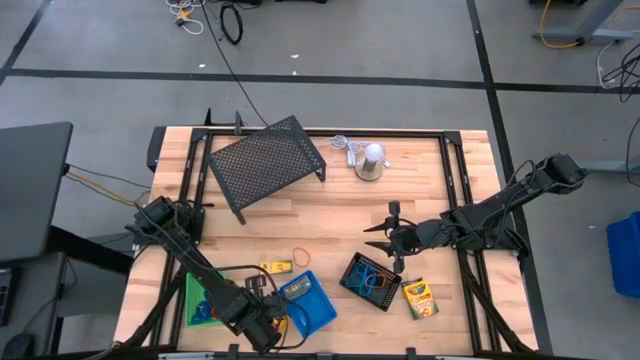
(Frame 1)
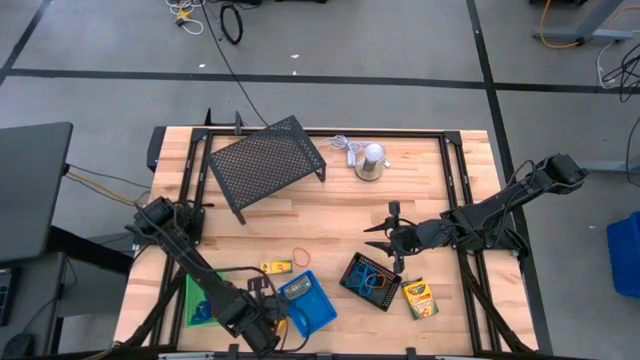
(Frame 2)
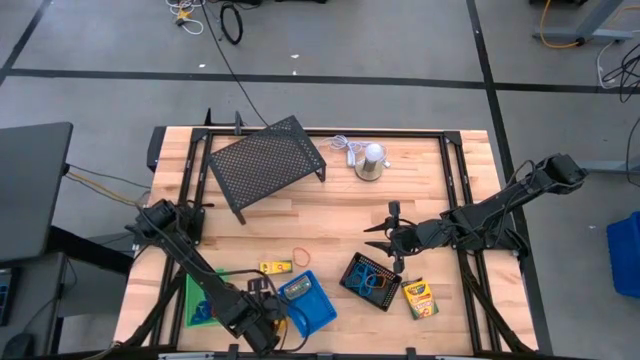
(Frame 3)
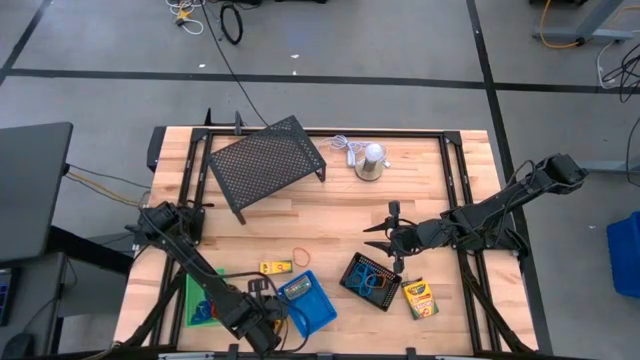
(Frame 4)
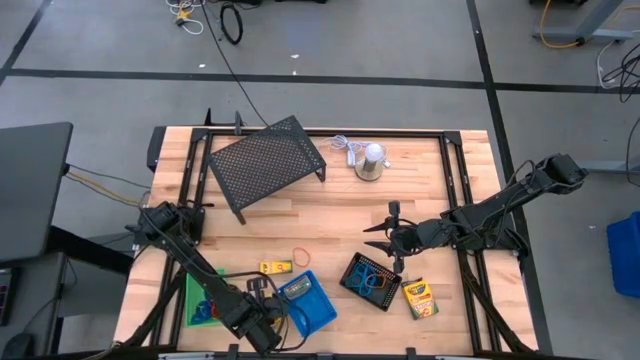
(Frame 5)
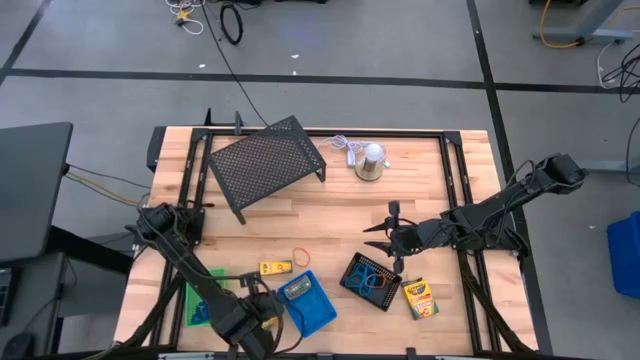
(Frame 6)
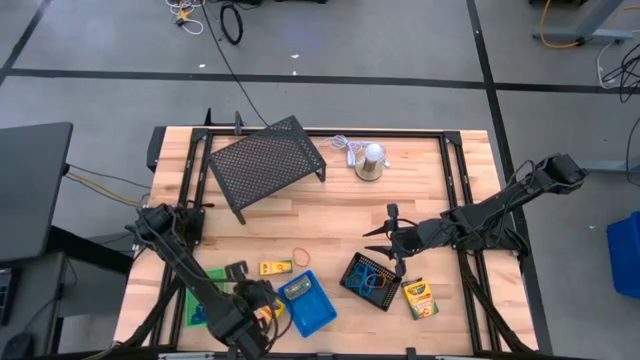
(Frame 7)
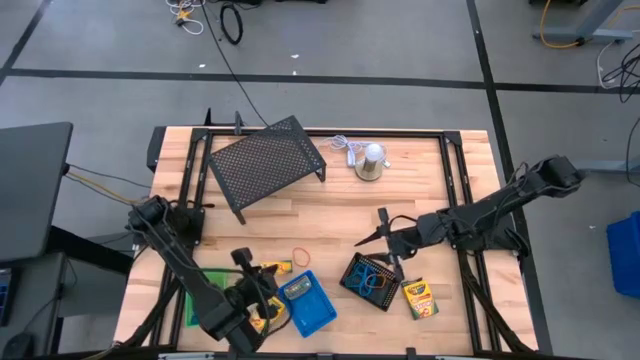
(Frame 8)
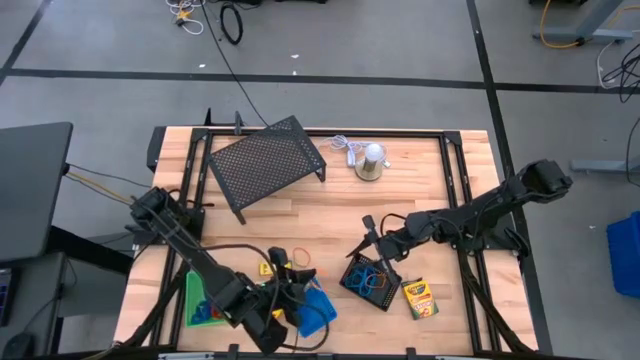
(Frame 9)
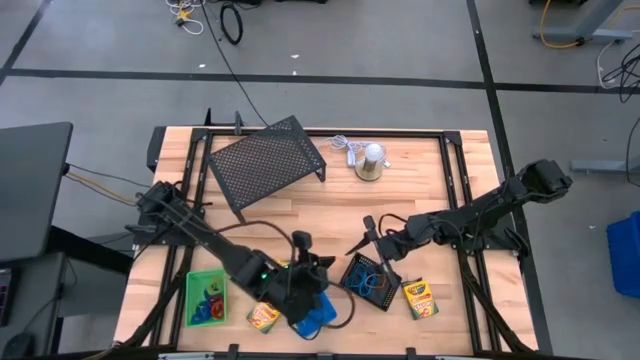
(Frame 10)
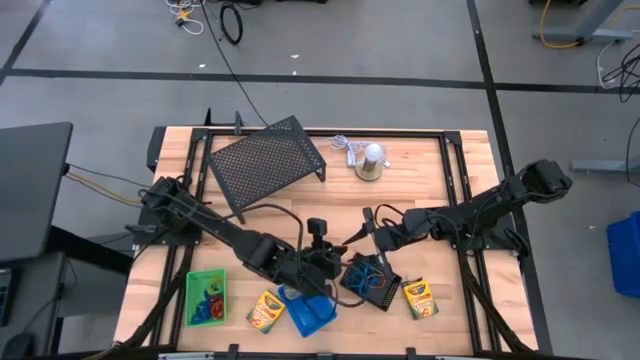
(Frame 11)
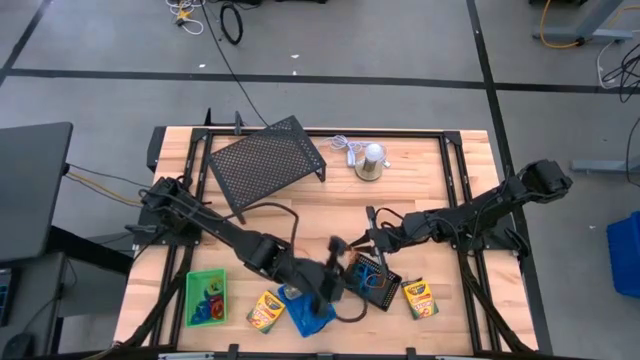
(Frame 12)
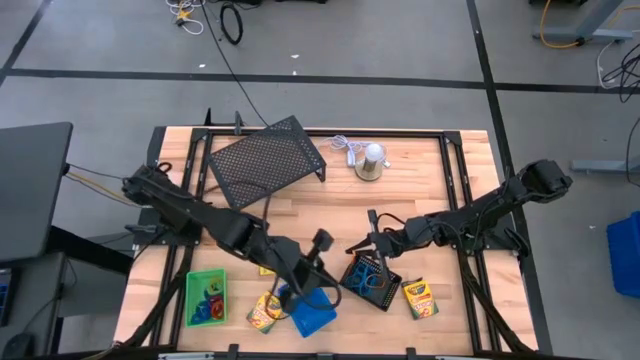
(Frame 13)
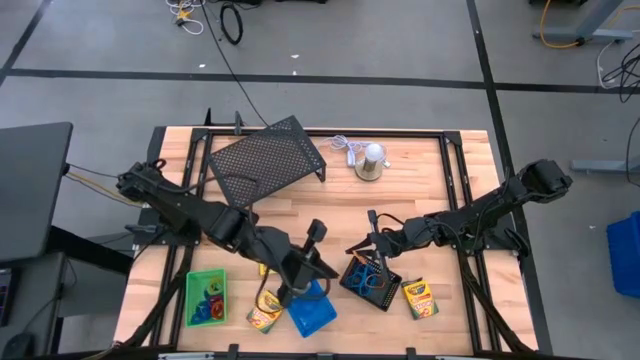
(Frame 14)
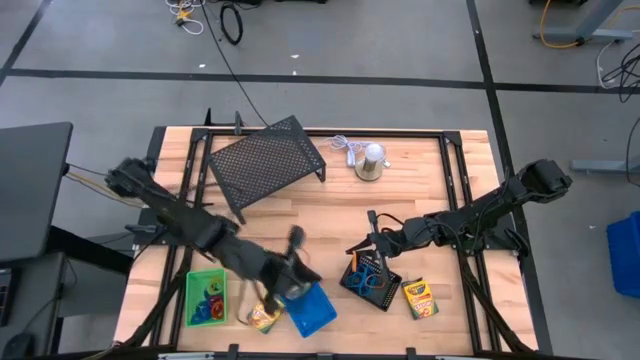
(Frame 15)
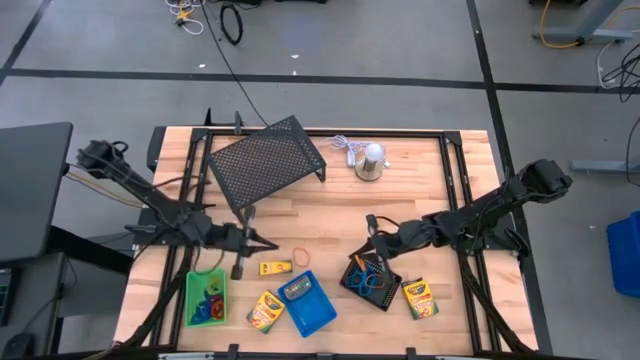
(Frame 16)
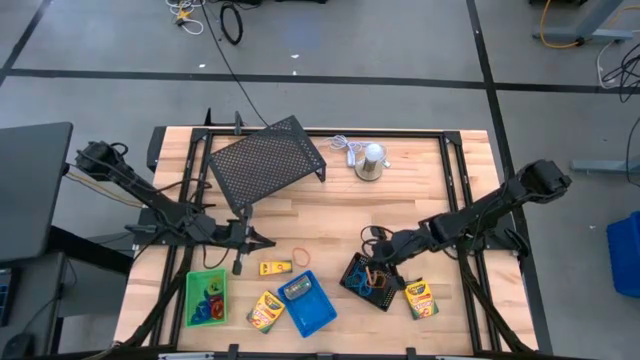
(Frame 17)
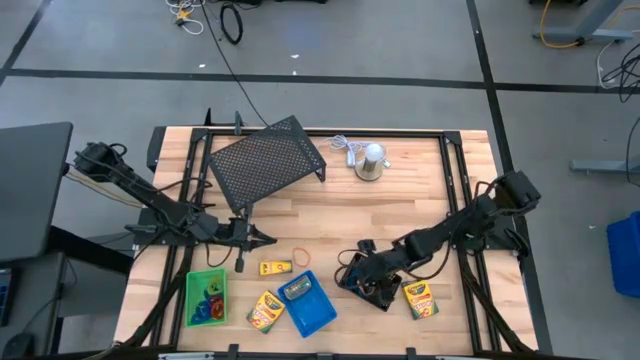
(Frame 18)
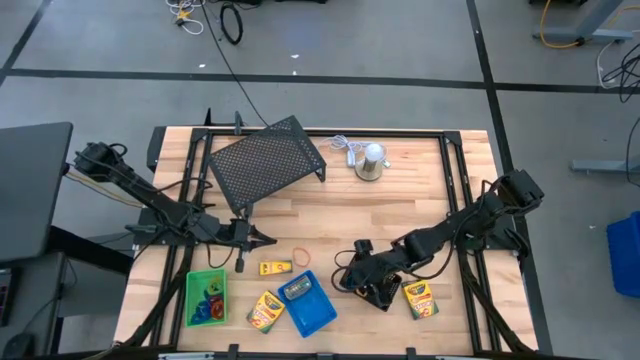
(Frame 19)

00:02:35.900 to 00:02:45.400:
Task: Pick & Place Office Desk Supplies
Put the orange rubber band into the black bin

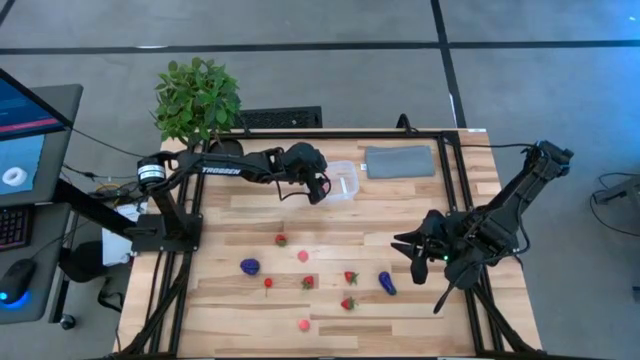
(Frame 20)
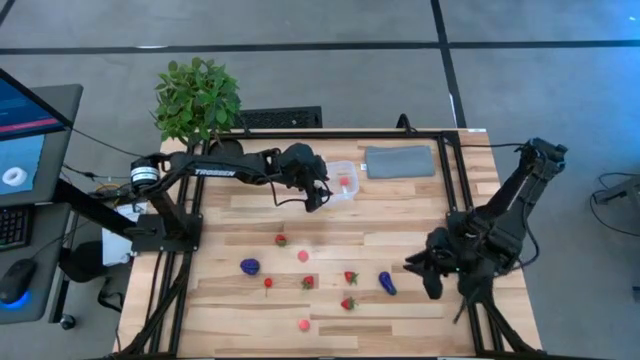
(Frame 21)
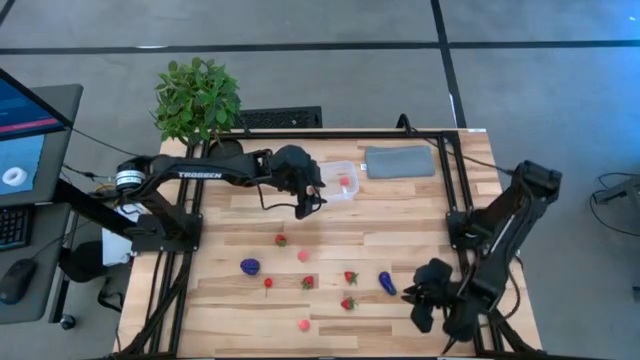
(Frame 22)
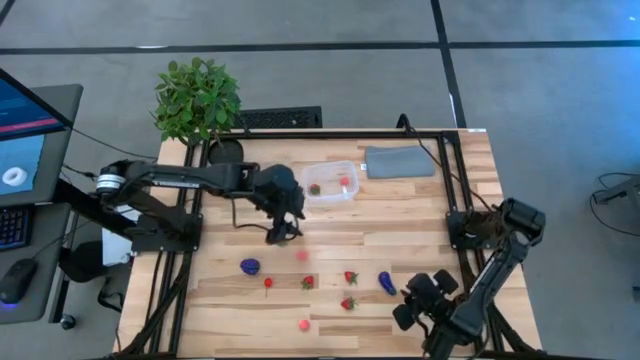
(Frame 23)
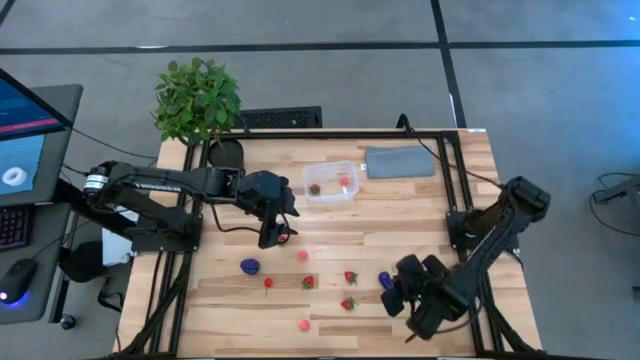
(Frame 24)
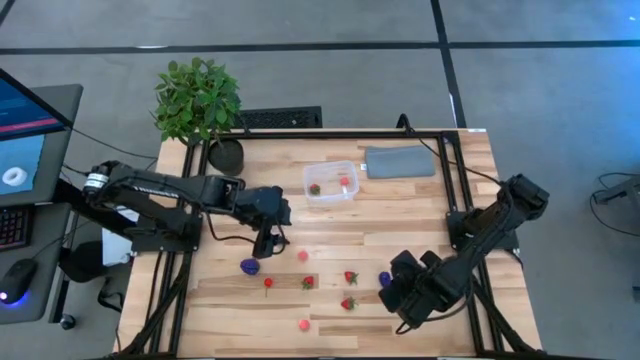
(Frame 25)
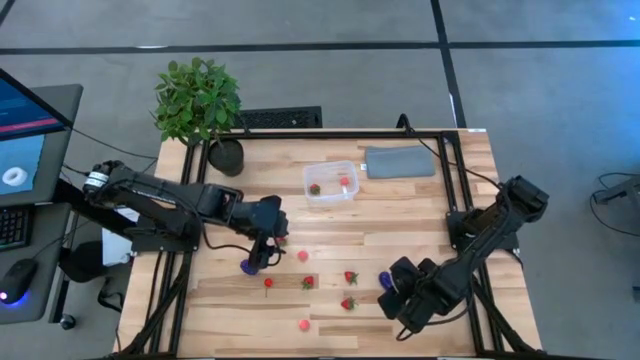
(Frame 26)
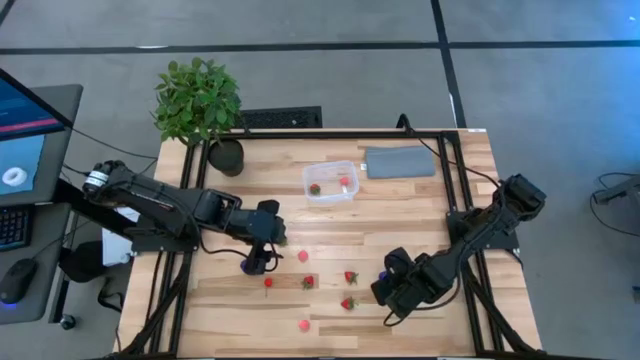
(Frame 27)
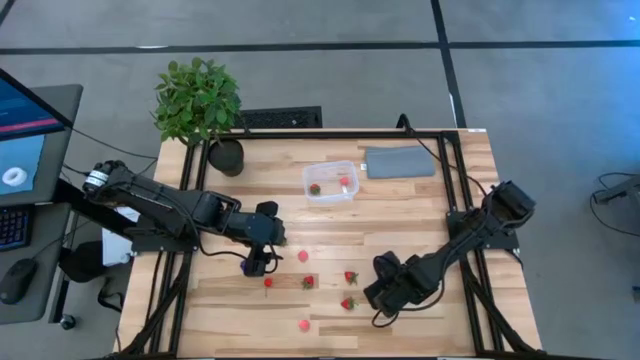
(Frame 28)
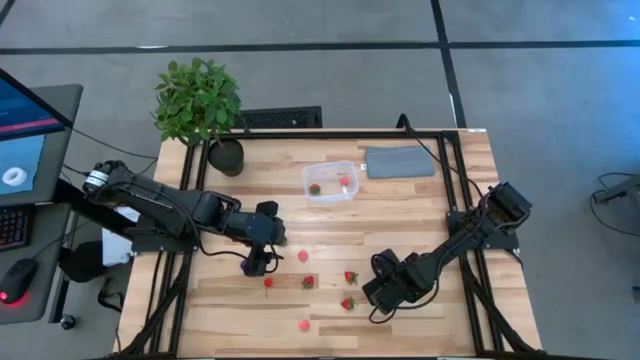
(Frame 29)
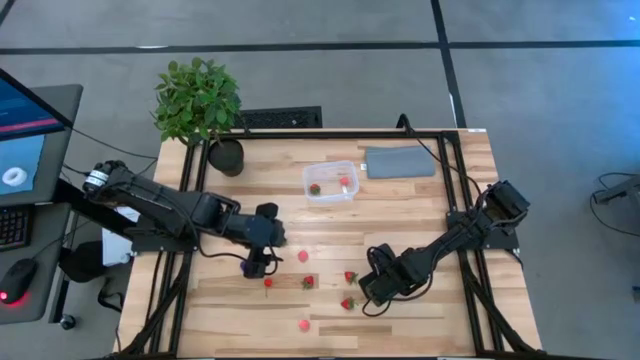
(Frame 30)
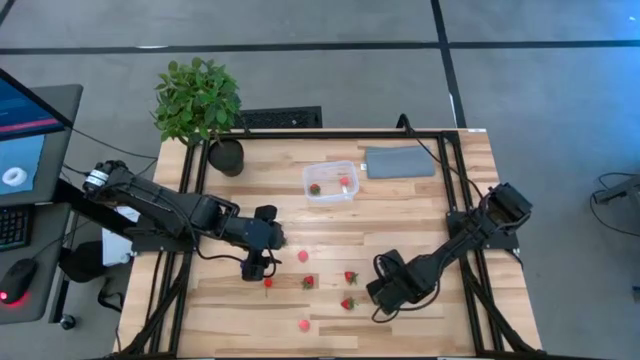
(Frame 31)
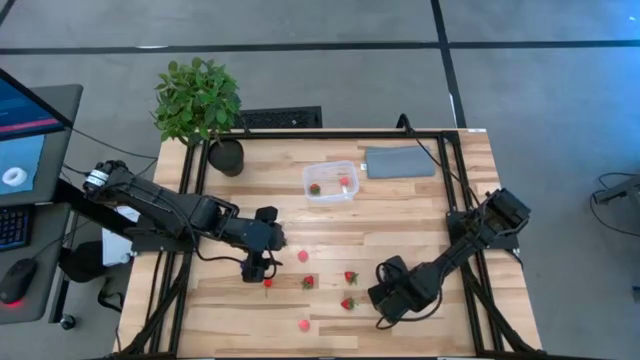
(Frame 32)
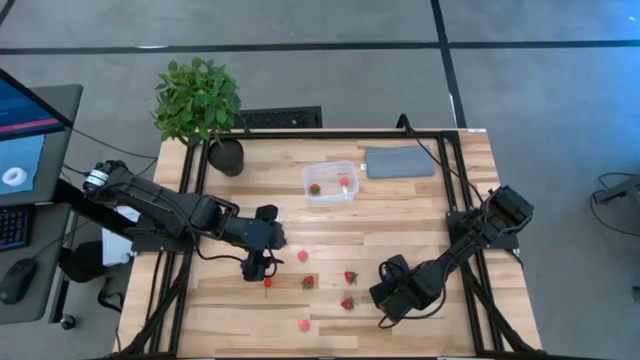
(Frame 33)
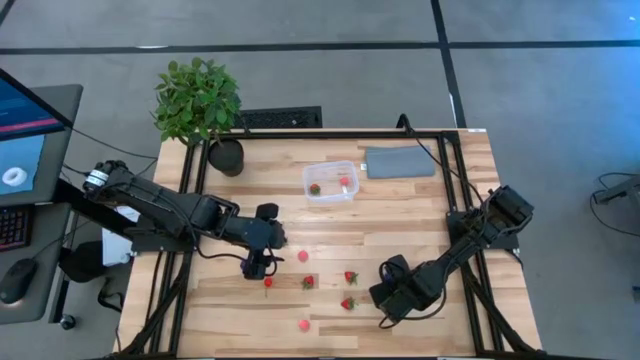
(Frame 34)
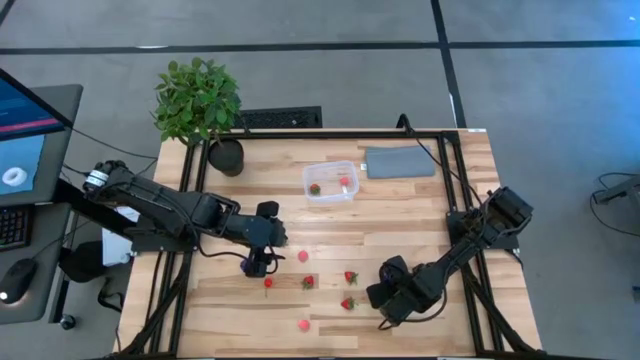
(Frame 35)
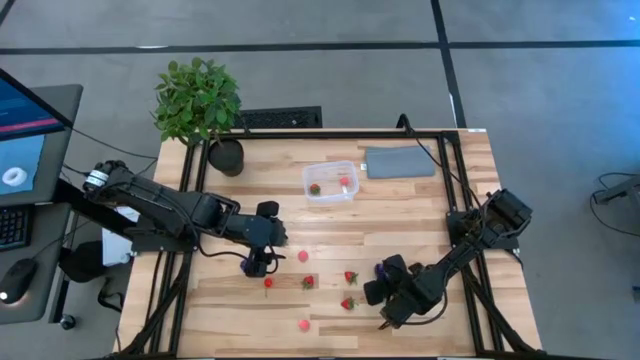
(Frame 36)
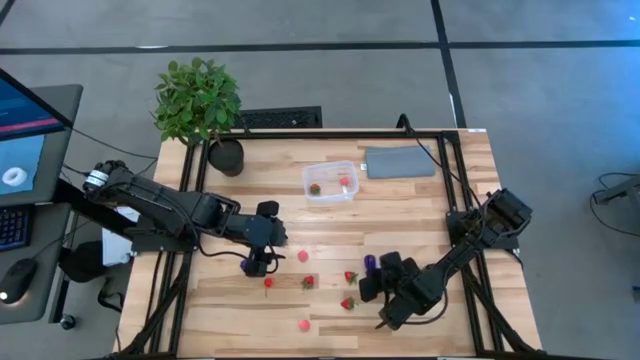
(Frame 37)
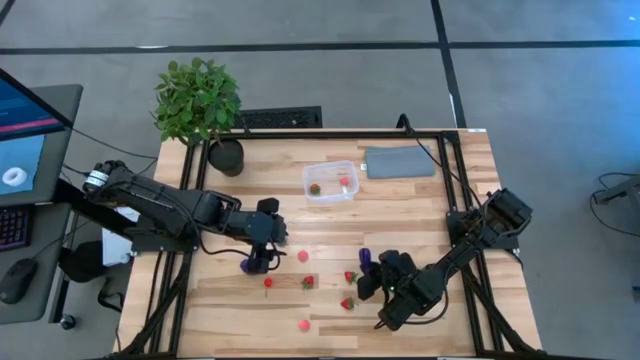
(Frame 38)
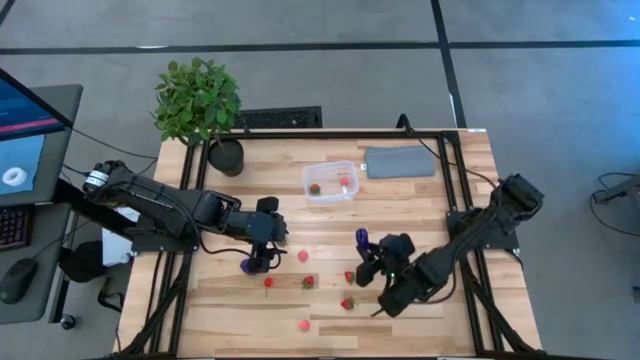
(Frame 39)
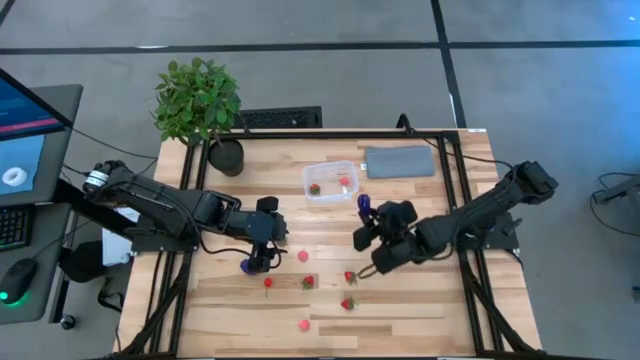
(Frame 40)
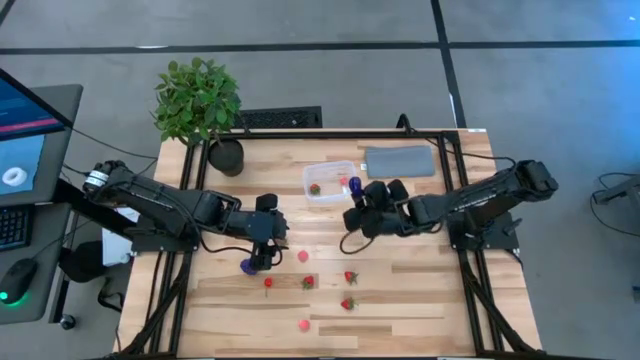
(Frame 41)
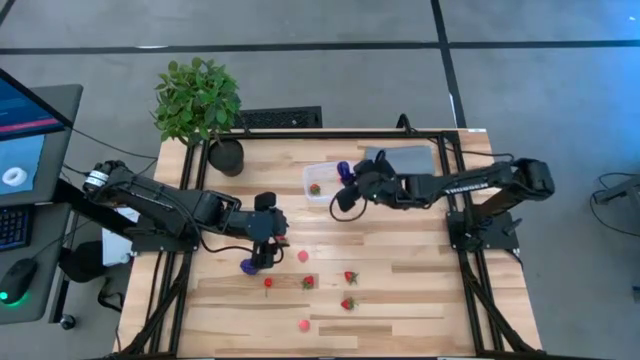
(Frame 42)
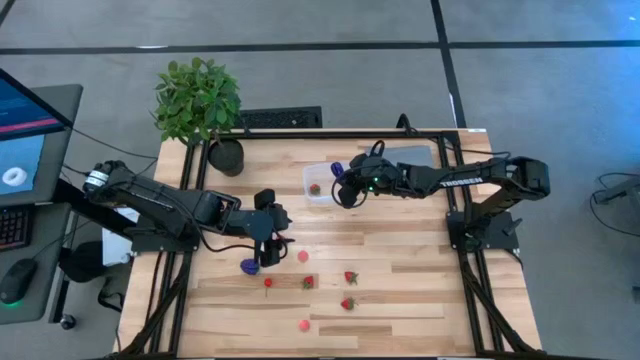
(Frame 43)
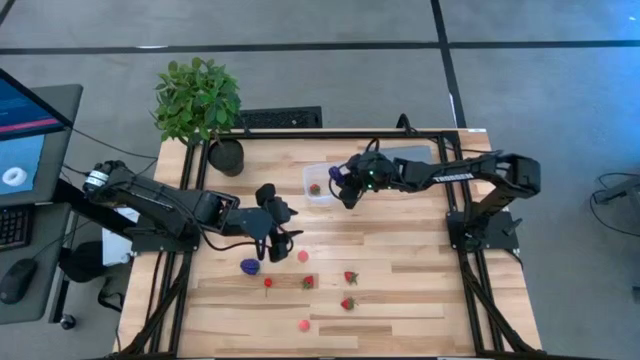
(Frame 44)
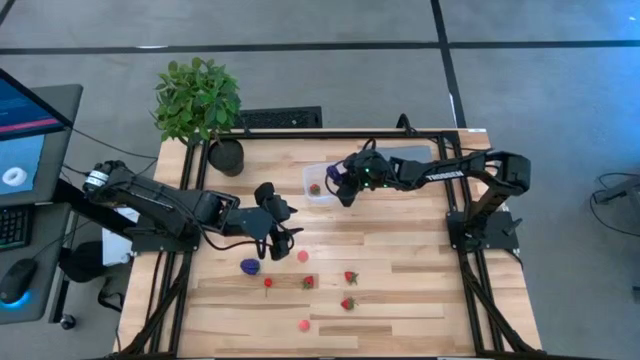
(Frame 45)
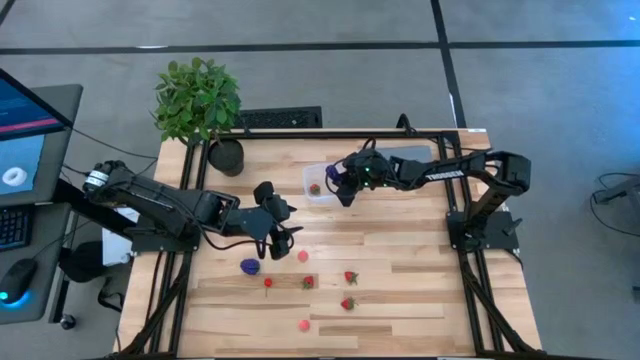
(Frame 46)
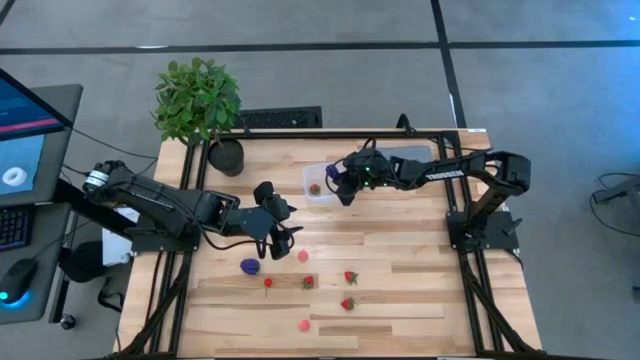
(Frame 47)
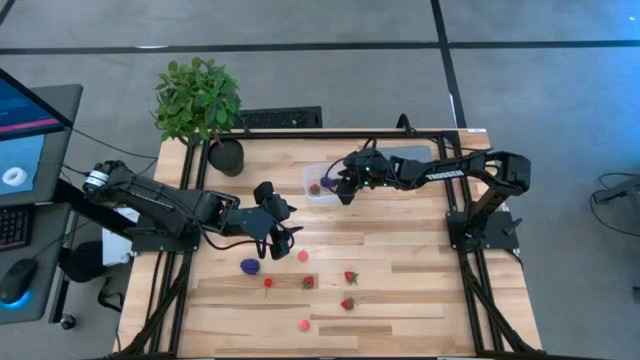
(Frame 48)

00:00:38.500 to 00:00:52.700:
Task: Pick and placing Produce into tupperware
Put the eggplant into the container
